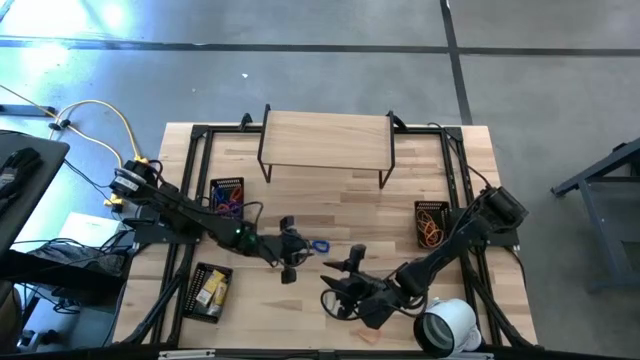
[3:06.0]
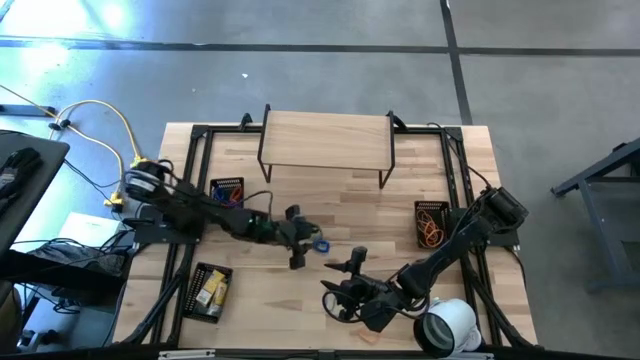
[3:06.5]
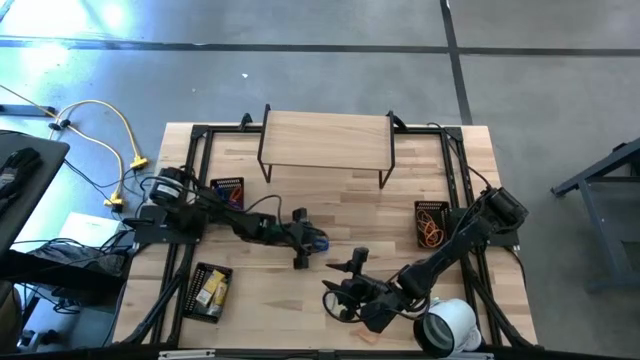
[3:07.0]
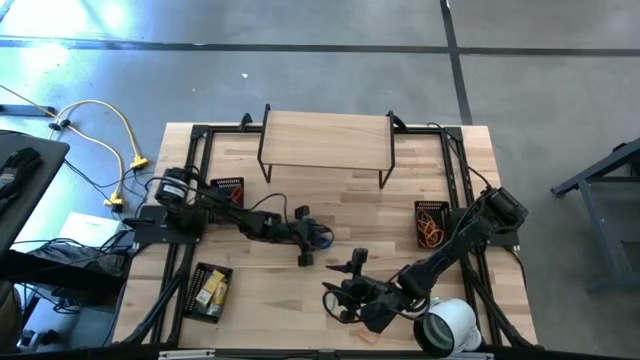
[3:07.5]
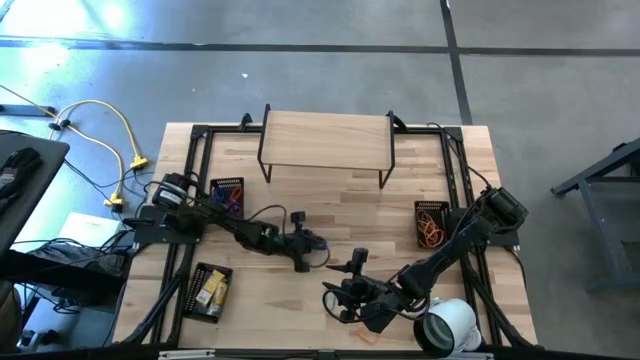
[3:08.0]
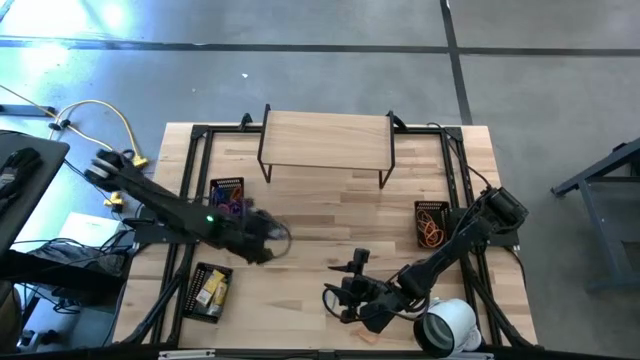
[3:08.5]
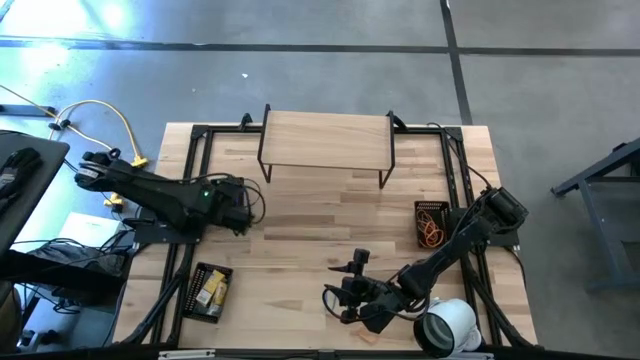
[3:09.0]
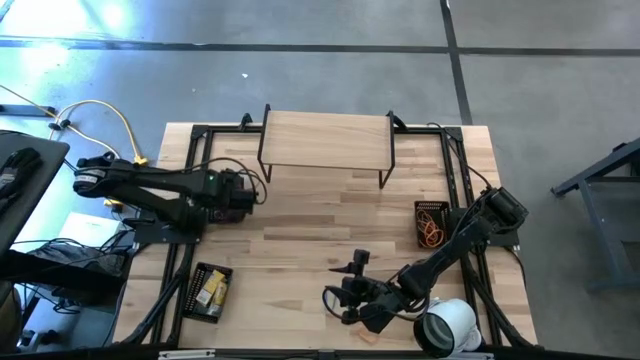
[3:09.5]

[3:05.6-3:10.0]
Task: Pick & Place Office Desk Supplies
Put the blue spring keychain into the top left black bin

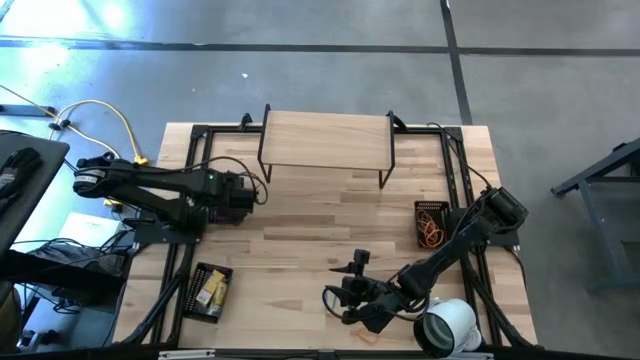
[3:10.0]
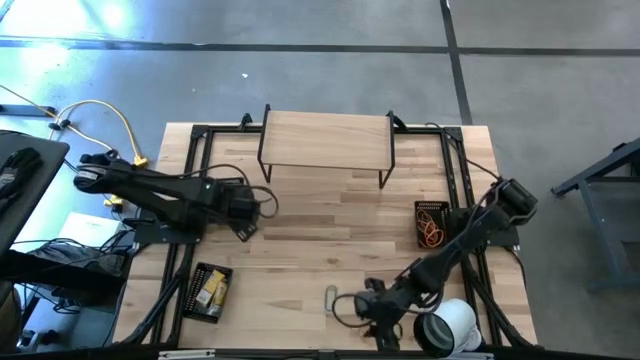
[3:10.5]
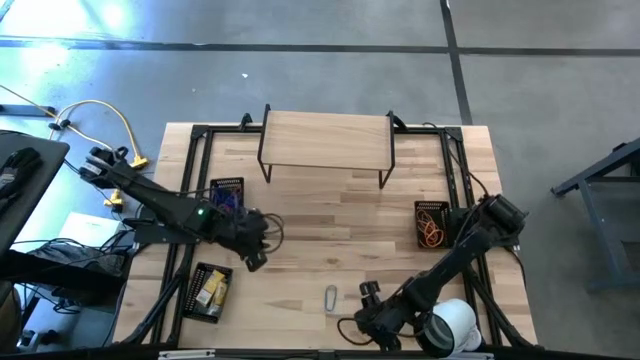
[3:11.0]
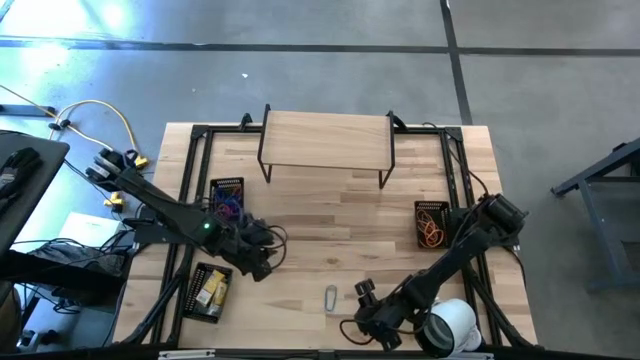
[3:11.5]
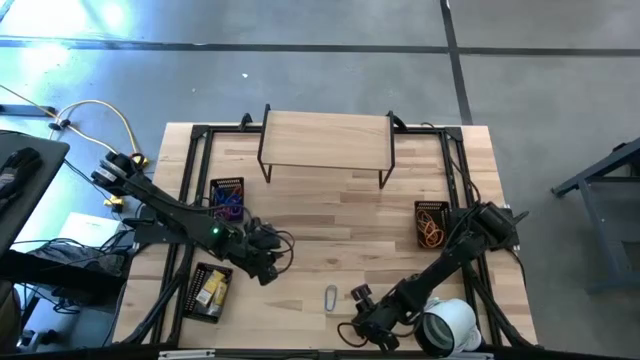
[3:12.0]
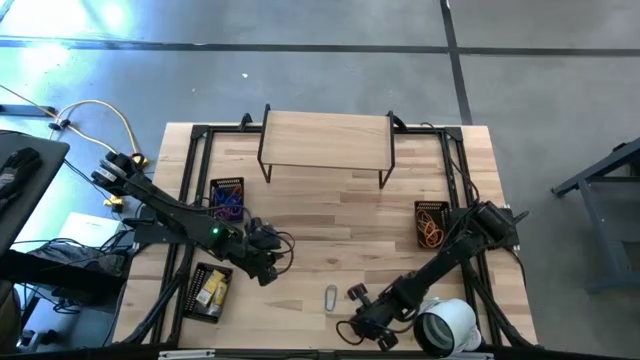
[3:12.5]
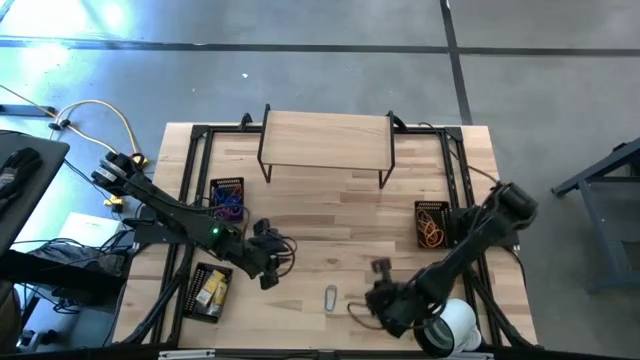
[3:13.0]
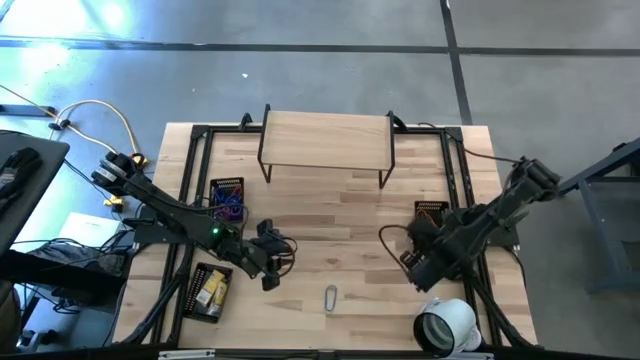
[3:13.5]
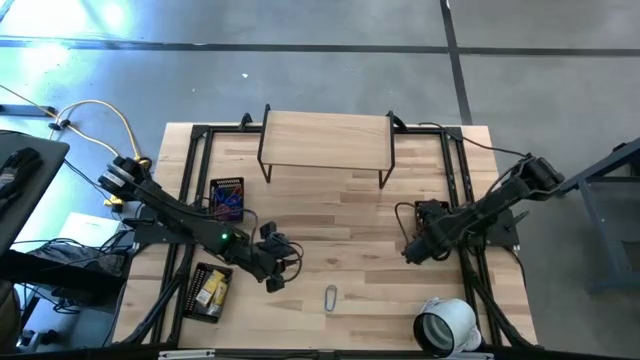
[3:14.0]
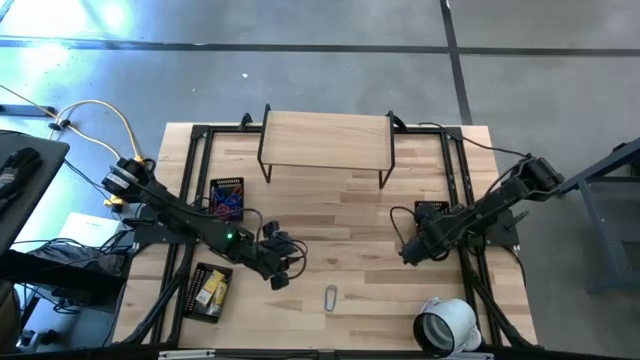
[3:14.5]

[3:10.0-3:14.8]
Put the orange rubber band into the top right black bin

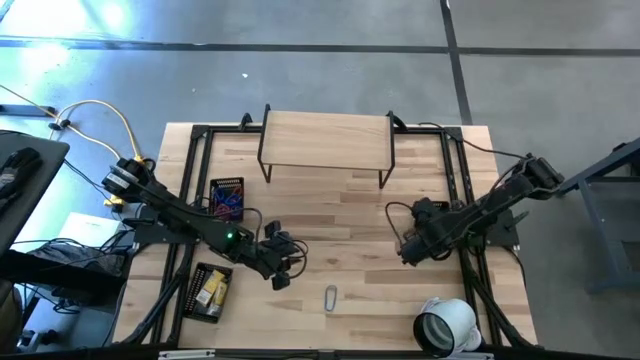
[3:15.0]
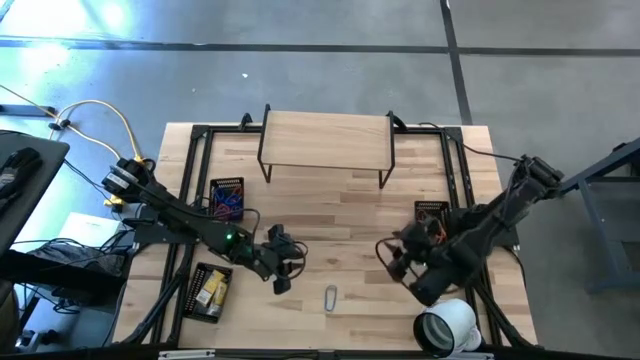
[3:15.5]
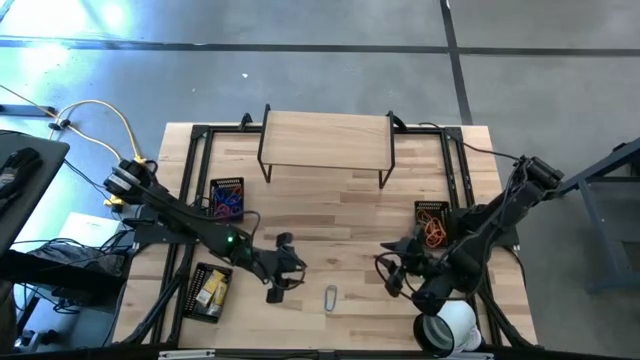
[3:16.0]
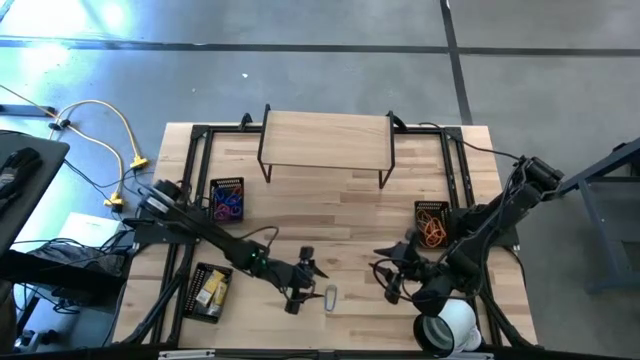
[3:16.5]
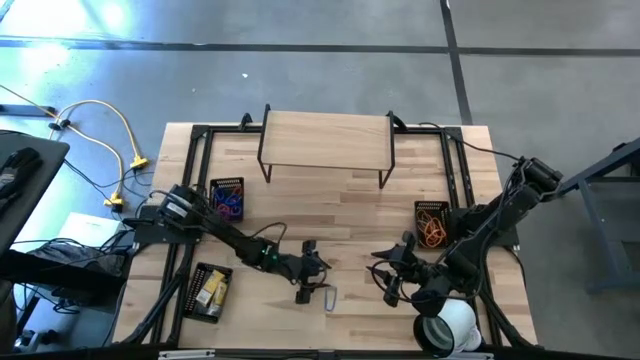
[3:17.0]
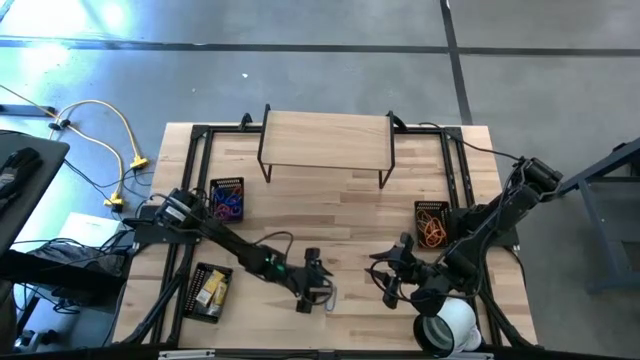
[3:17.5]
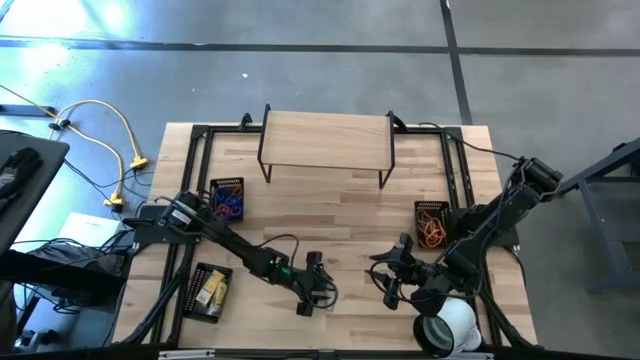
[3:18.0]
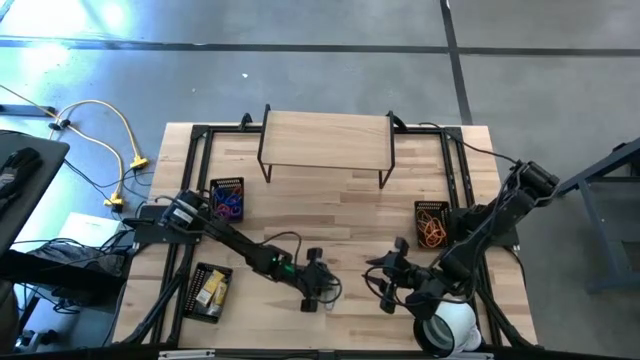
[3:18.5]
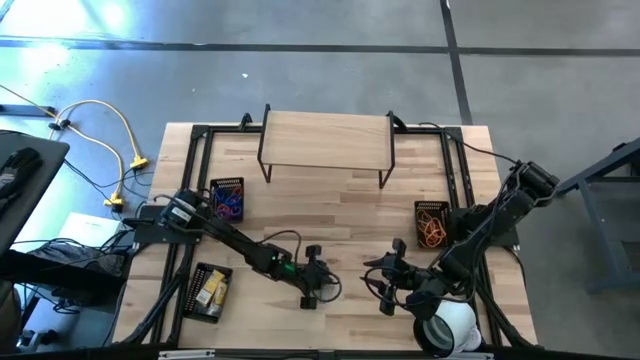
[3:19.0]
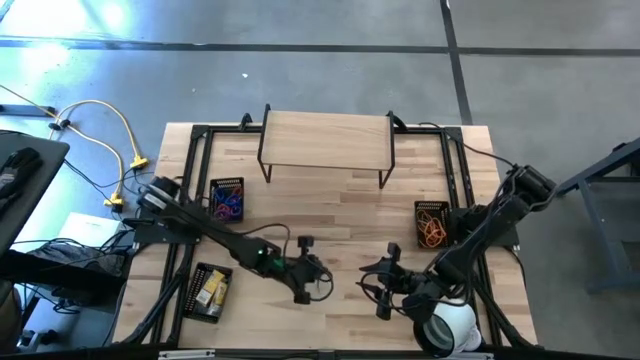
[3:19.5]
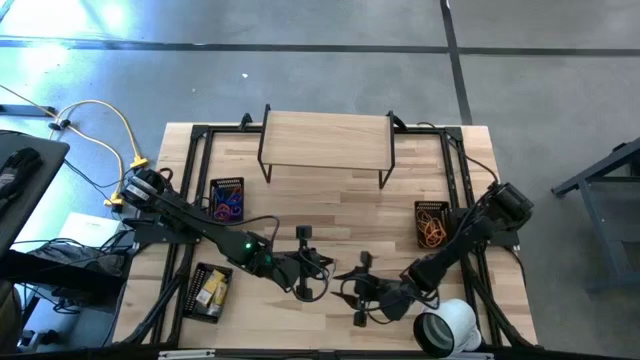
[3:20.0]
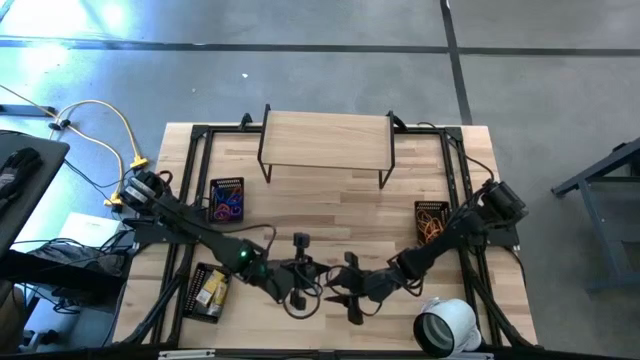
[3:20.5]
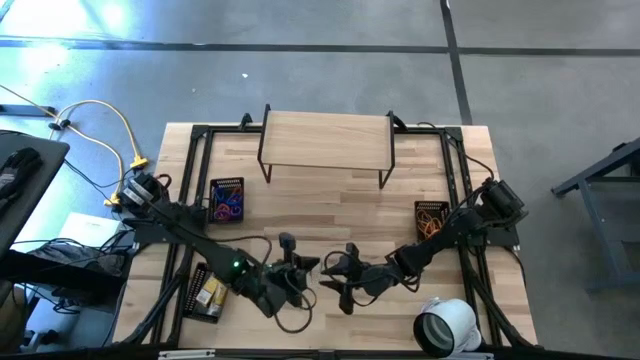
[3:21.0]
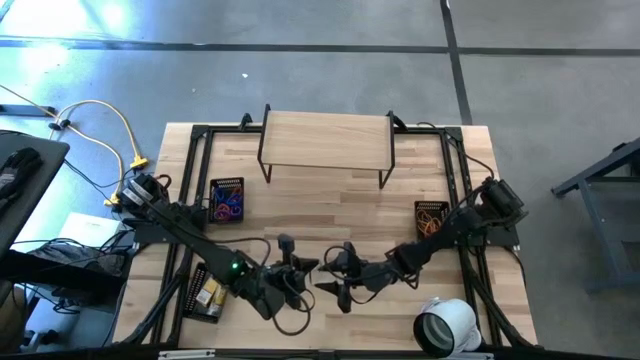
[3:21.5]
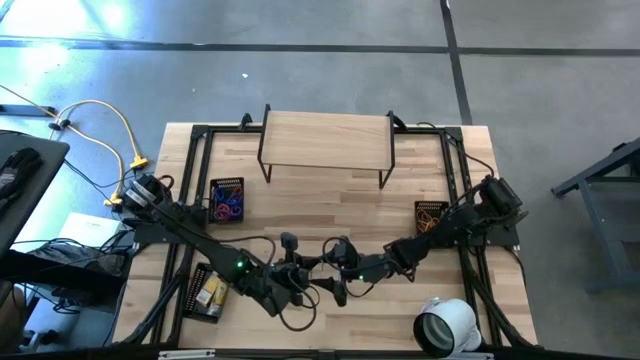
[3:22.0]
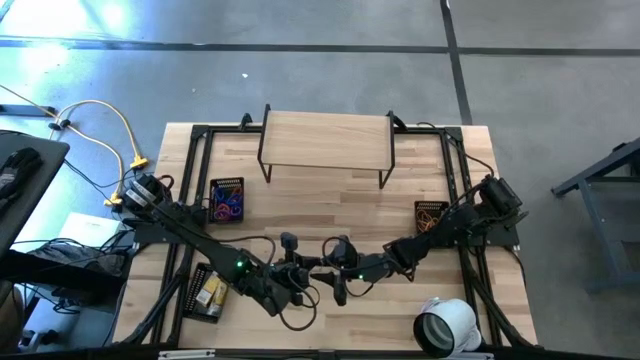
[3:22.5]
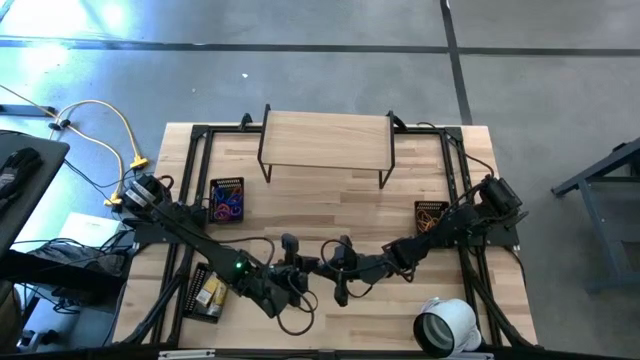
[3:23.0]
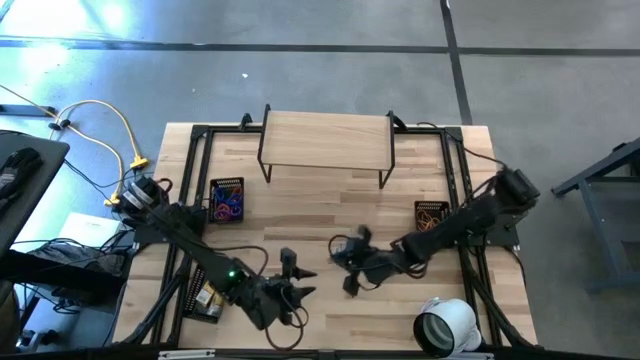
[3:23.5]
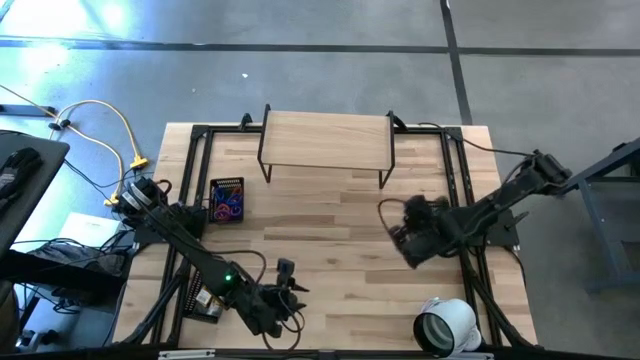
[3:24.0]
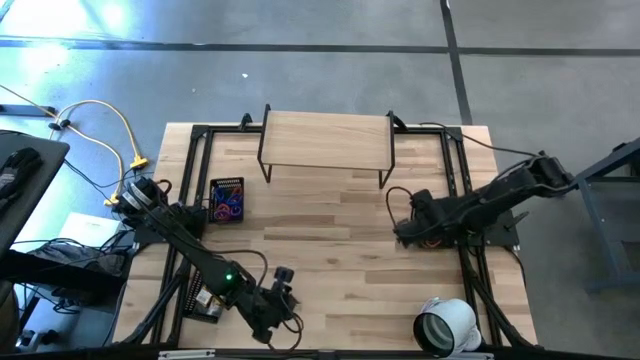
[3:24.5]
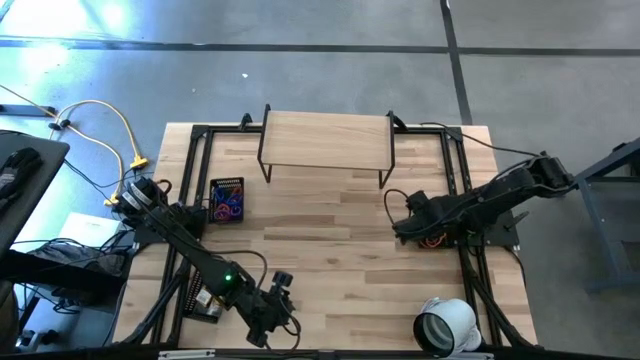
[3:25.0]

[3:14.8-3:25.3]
Put the blue rubber band into the top right black bin

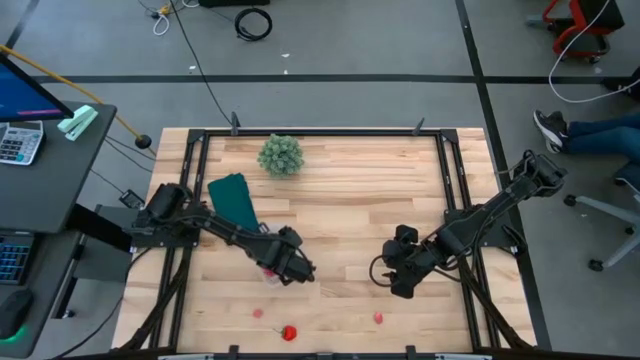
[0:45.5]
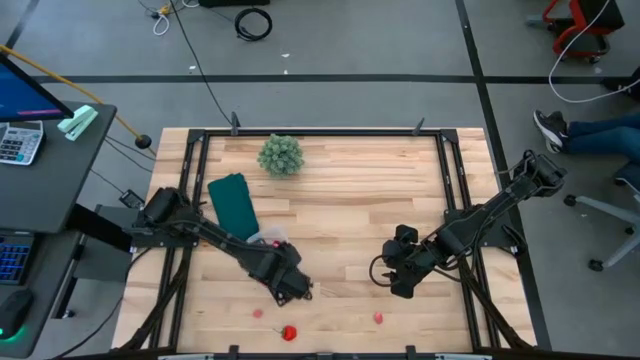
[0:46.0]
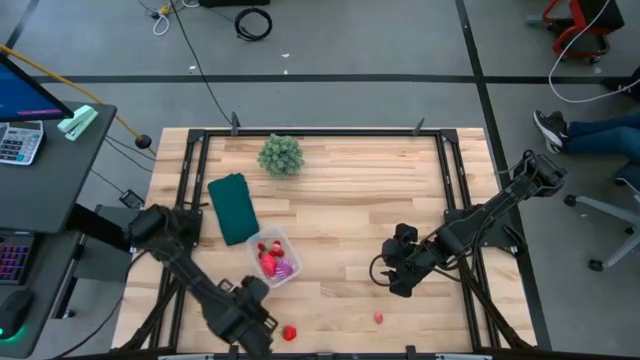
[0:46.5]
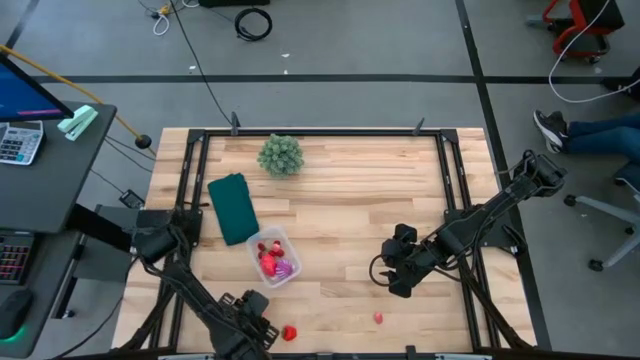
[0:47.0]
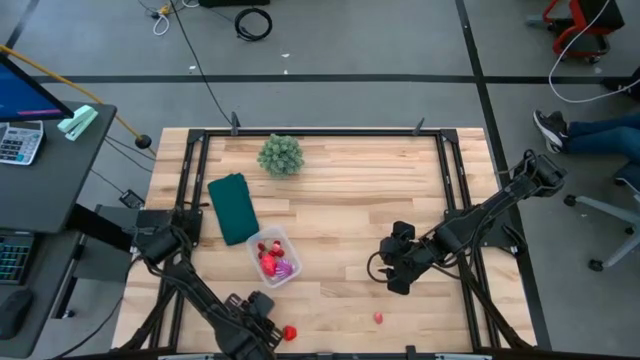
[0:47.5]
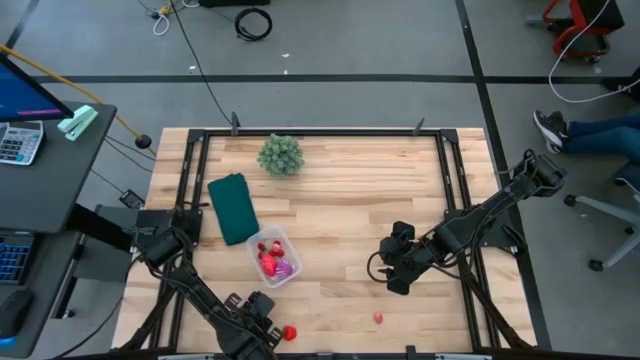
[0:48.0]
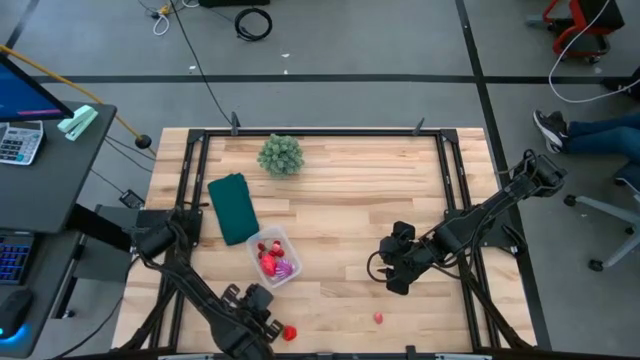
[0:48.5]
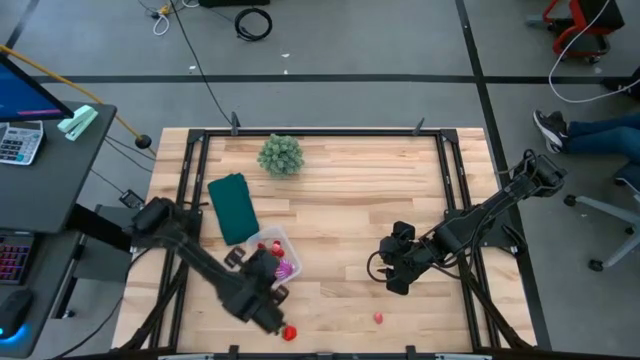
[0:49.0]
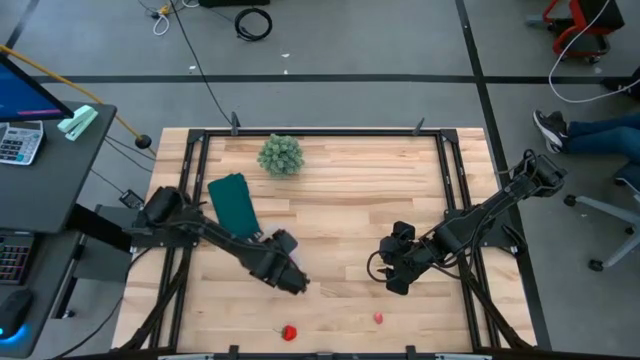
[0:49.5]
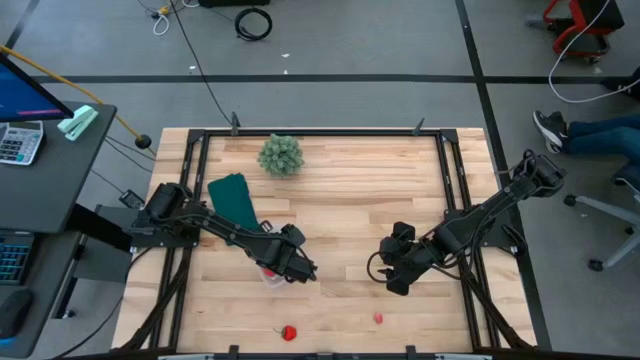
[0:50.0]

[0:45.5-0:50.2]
Task: Pick and placing Produce into tupperware
Put the left pink peach into the transparent bin
